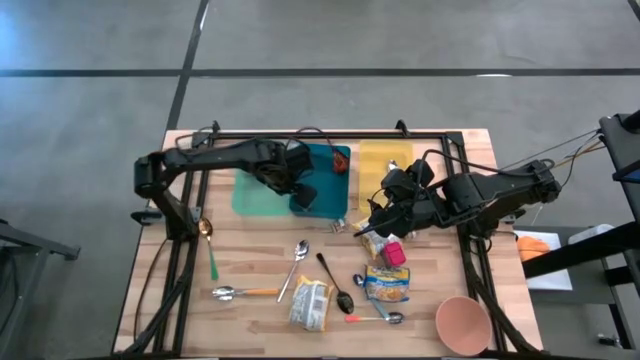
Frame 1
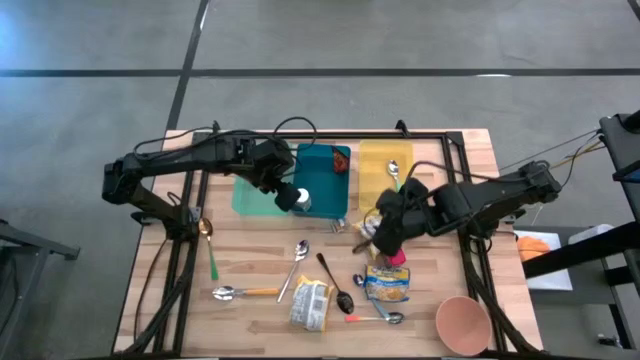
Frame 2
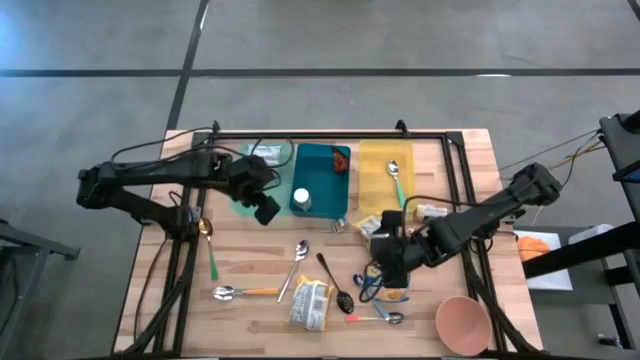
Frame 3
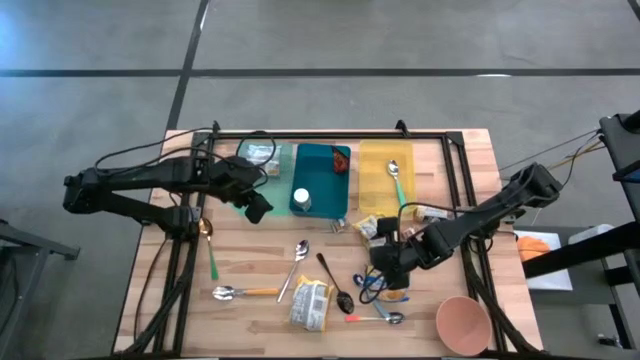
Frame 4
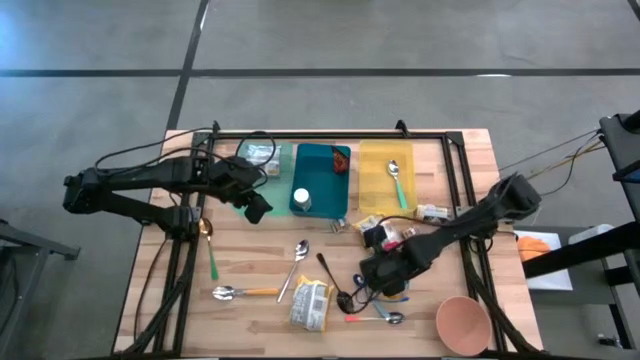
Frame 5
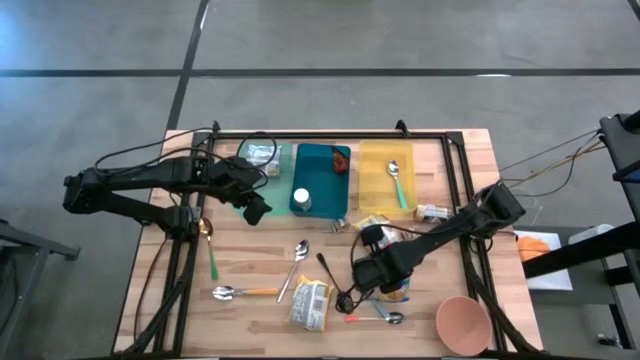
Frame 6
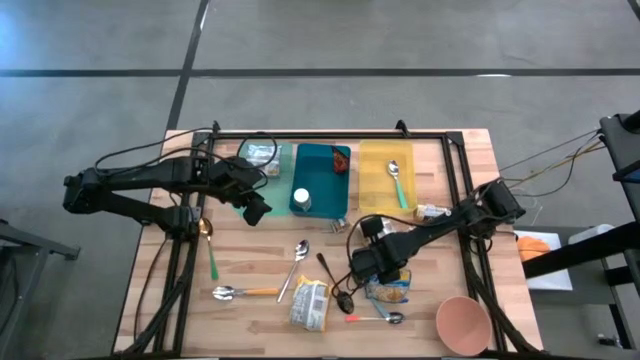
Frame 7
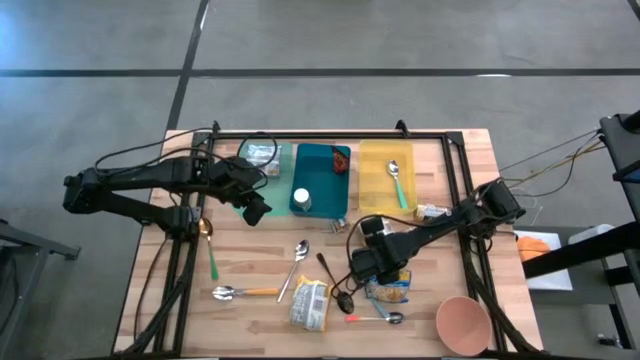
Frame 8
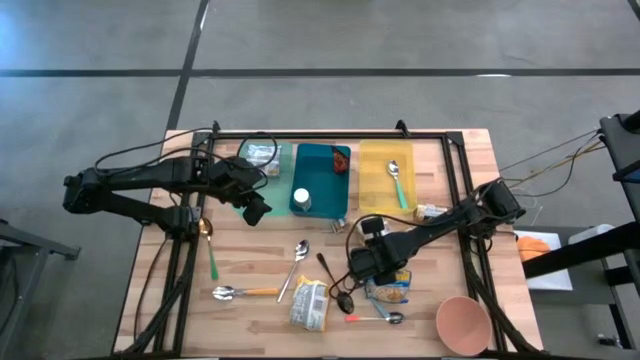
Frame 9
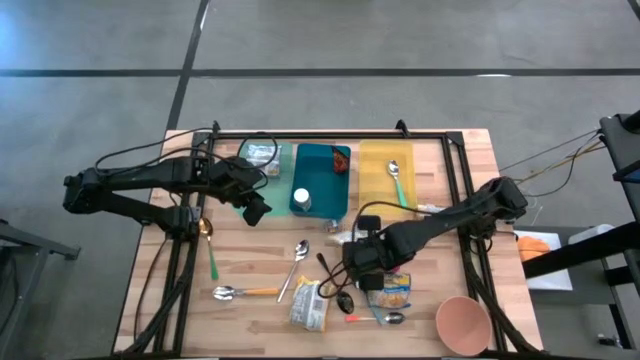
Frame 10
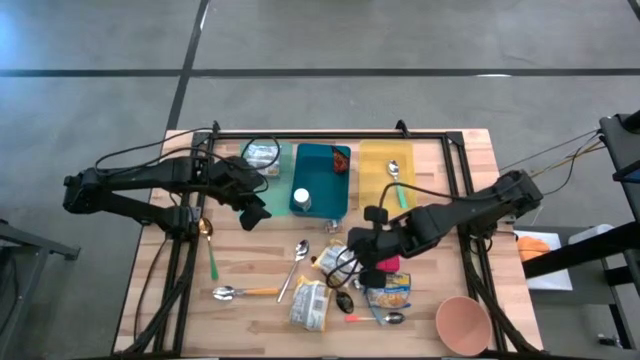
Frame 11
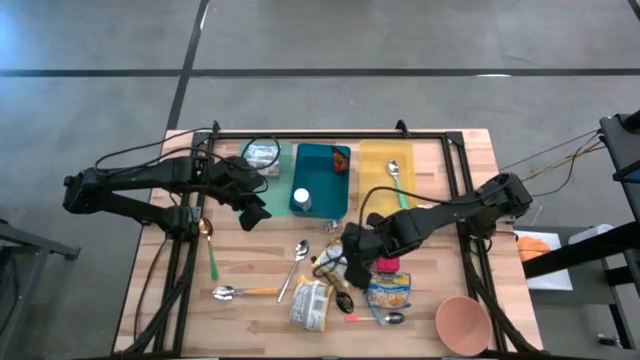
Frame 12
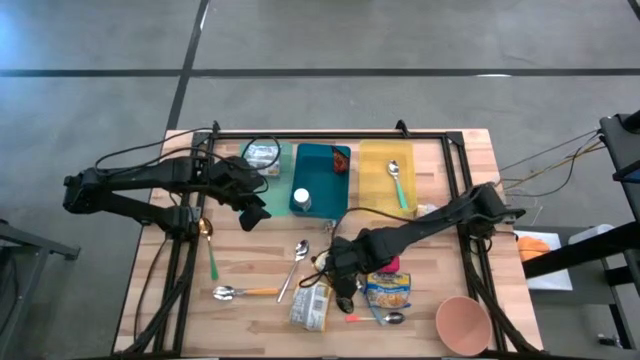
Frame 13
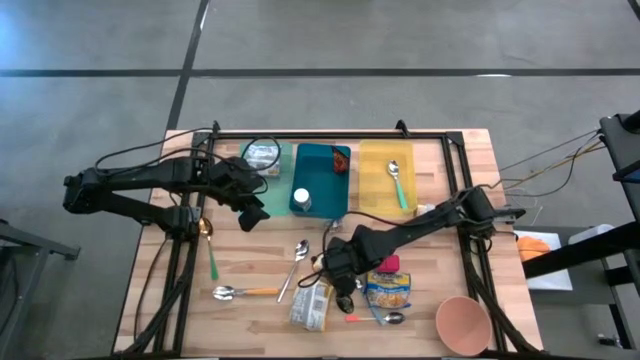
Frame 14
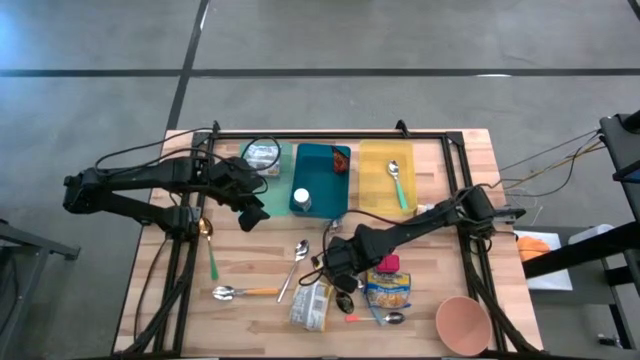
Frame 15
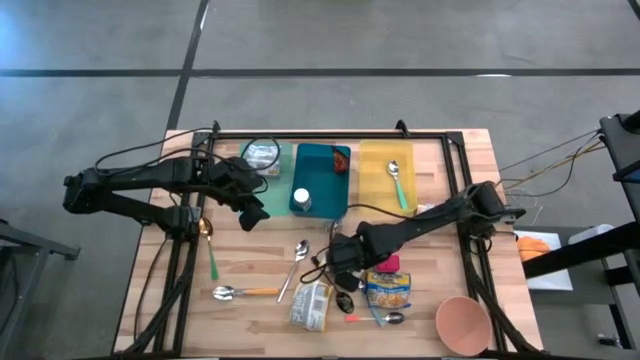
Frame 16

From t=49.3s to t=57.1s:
Put the top yellow noodle pack into the green bin

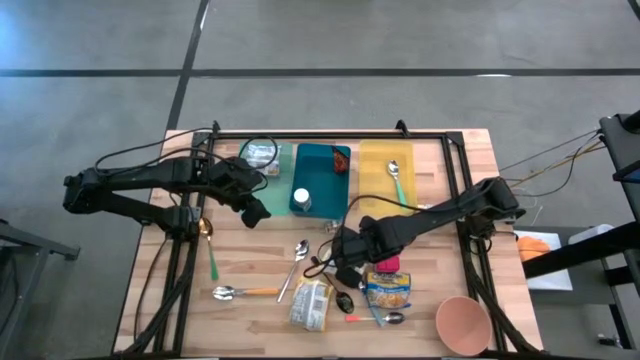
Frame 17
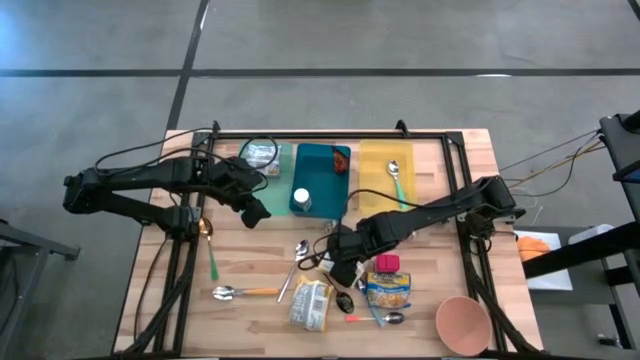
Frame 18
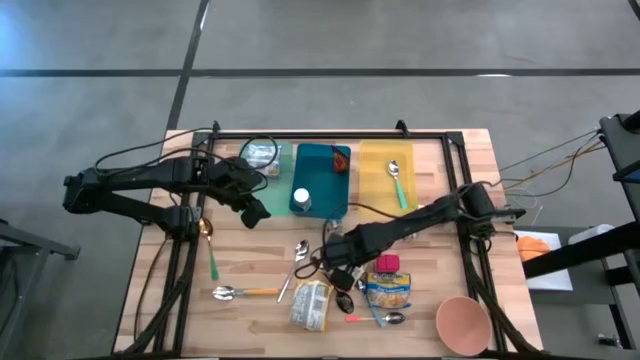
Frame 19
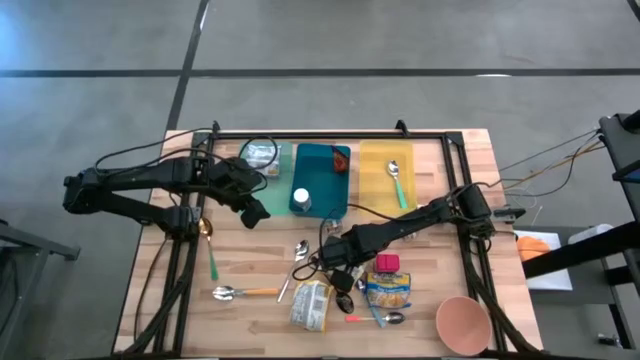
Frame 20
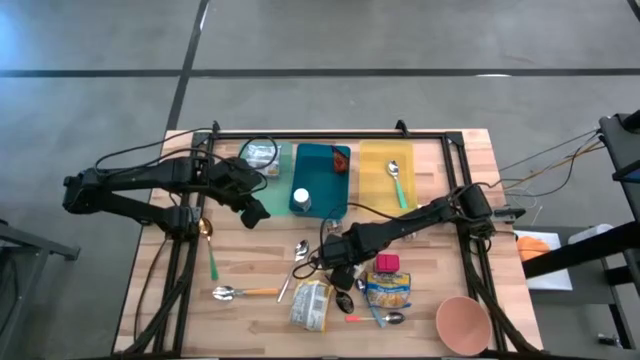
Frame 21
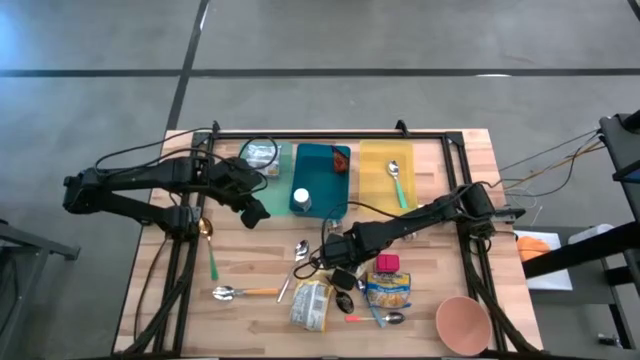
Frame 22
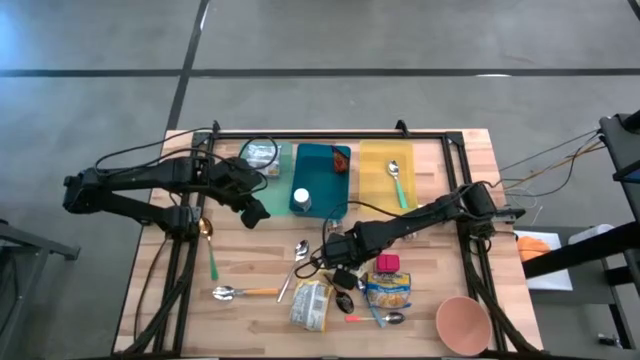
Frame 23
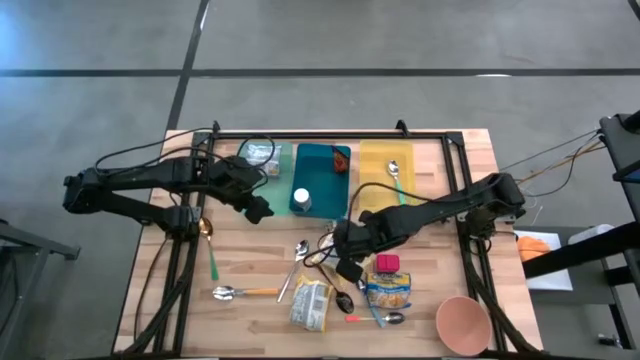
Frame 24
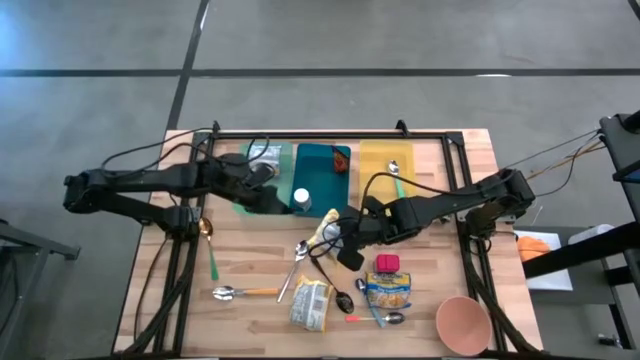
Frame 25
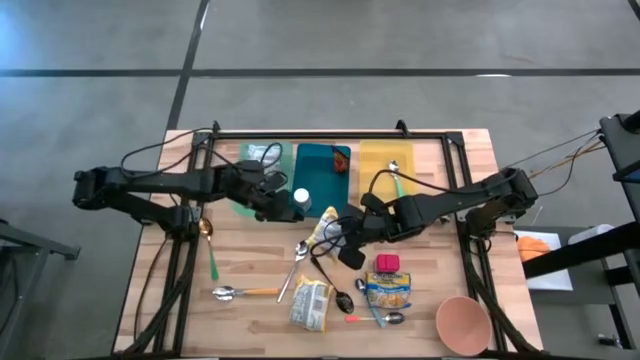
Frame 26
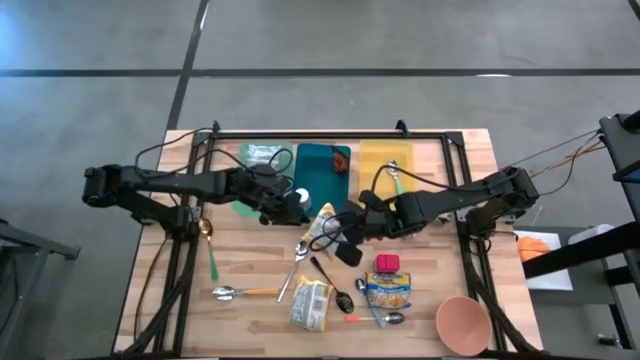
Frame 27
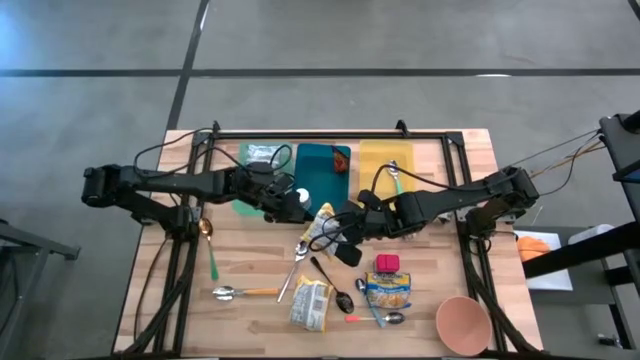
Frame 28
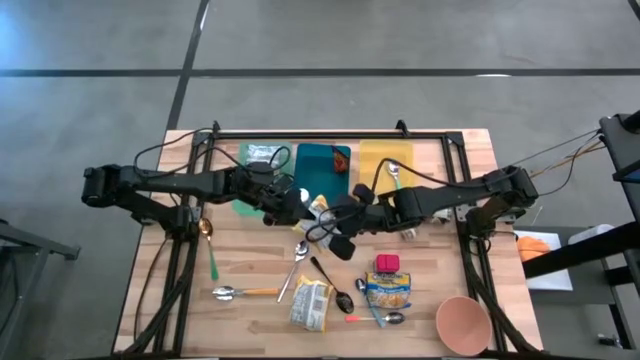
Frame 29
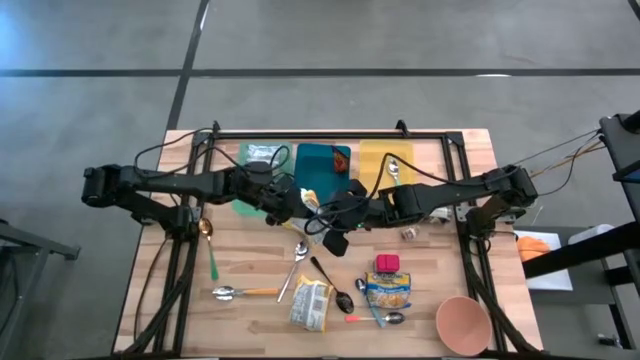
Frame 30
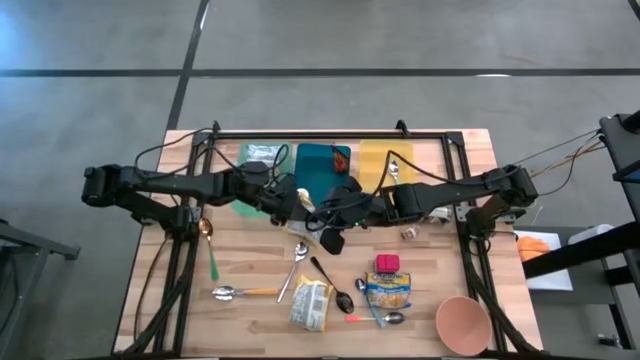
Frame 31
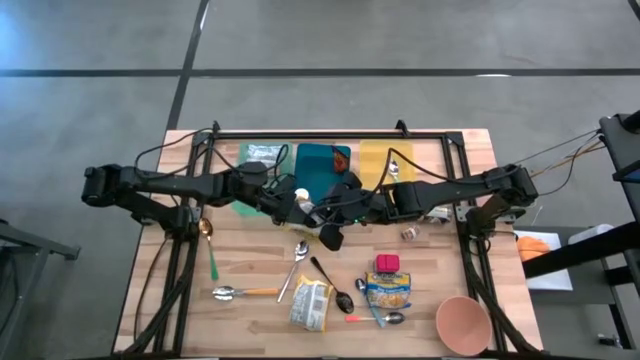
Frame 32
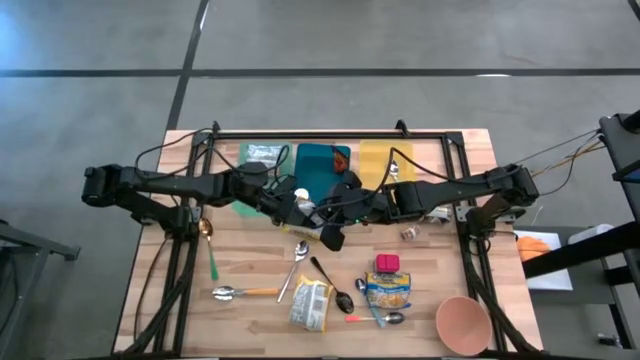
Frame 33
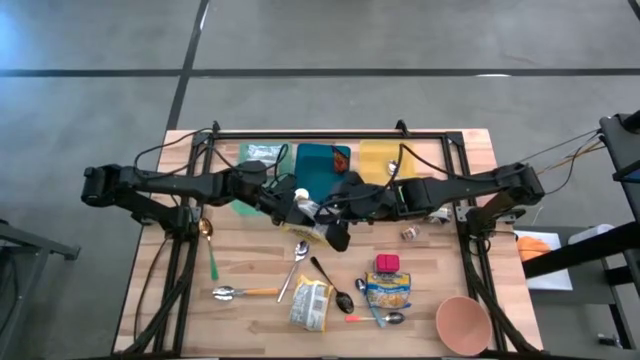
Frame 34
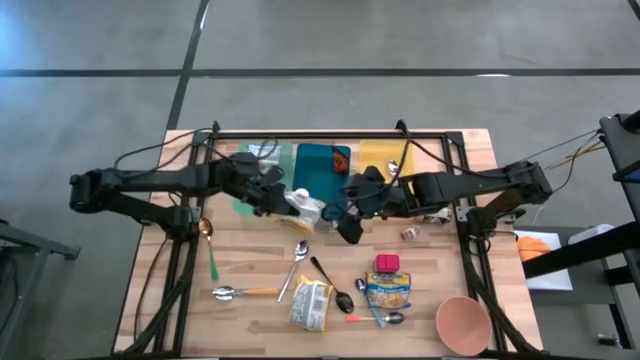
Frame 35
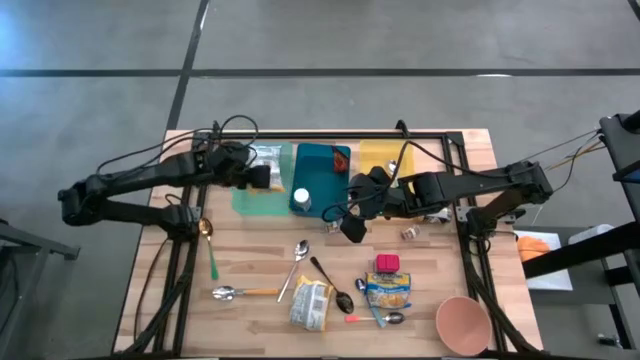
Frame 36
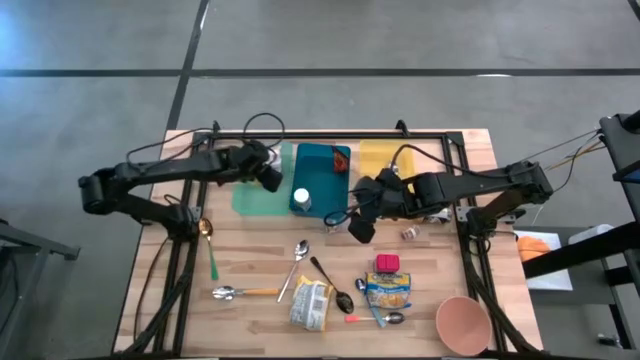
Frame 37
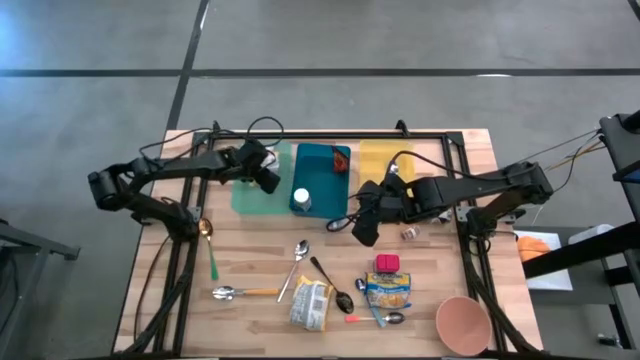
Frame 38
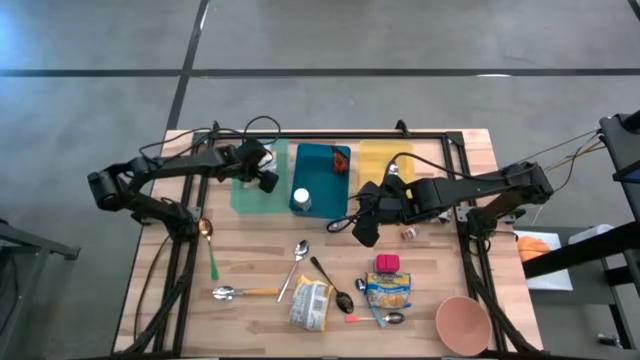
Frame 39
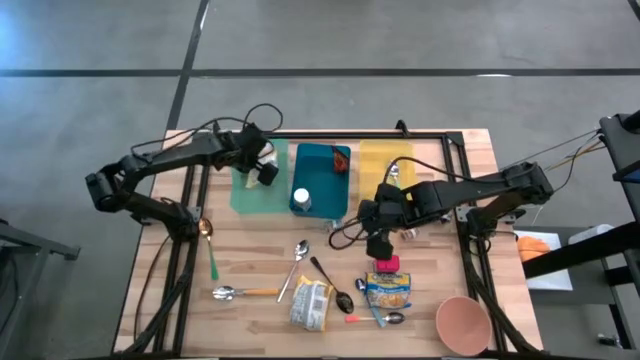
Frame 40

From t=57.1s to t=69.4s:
Put the top yellow noodle pack into the green bin

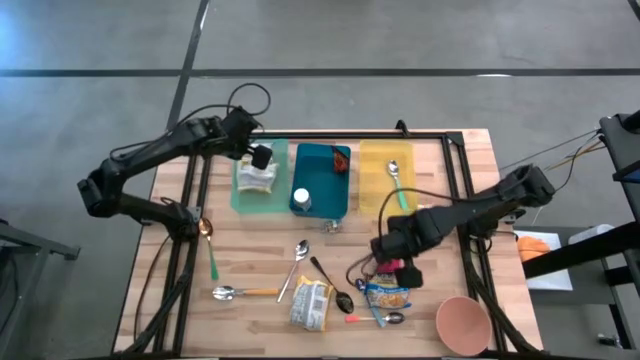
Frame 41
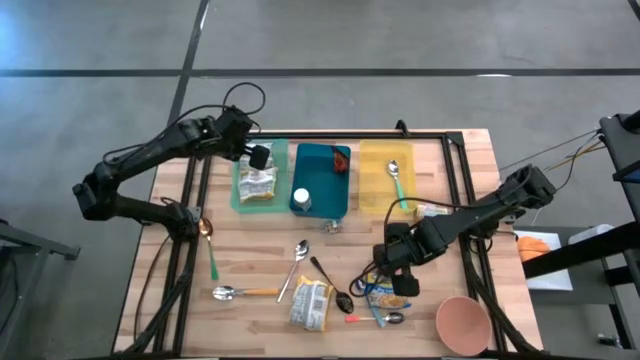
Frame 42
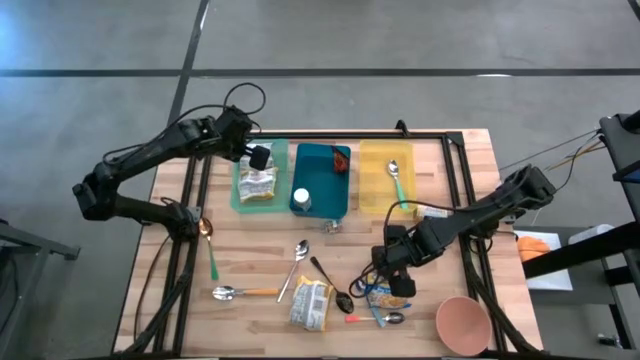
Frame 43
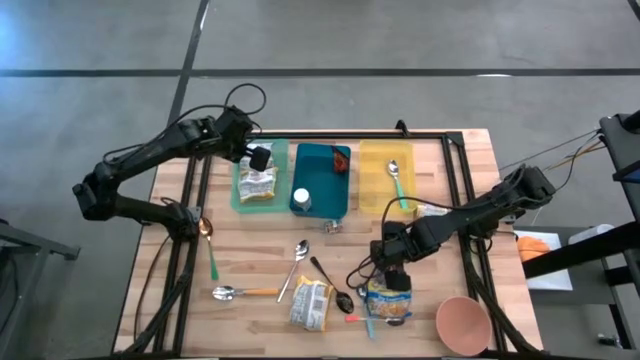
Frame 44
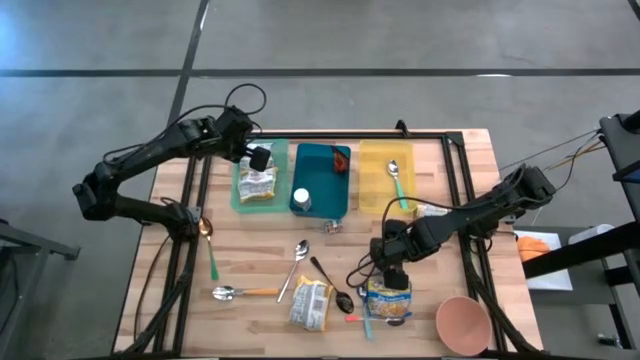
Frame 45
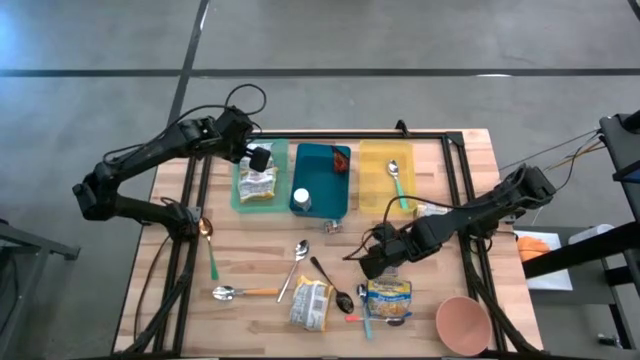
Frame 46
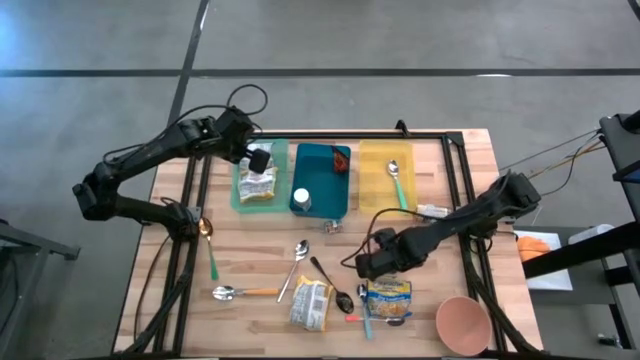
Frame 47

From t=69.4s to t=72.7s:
Put the red seasoning can into the blue bin
